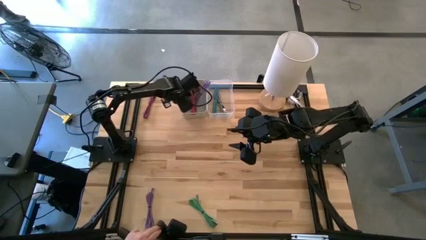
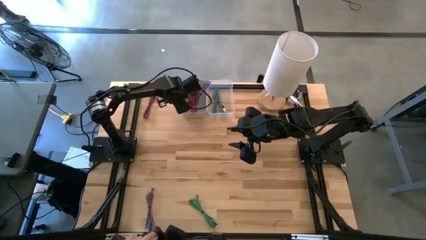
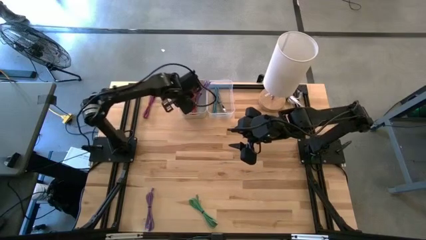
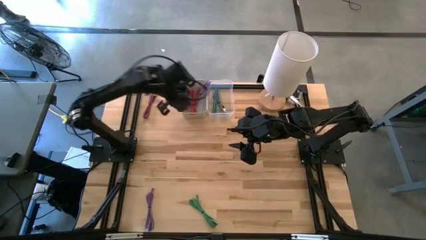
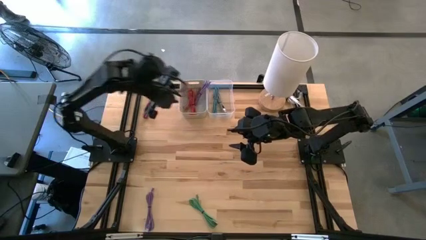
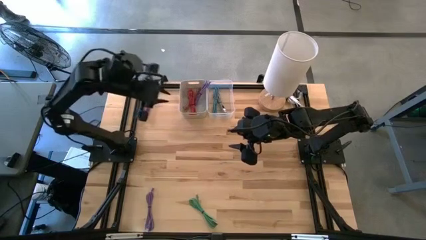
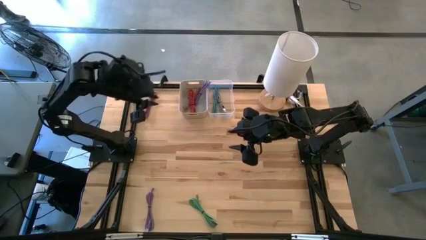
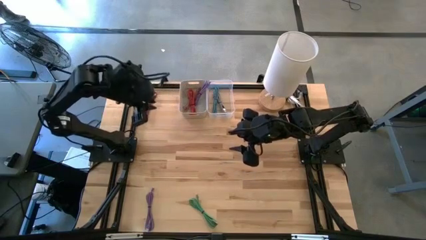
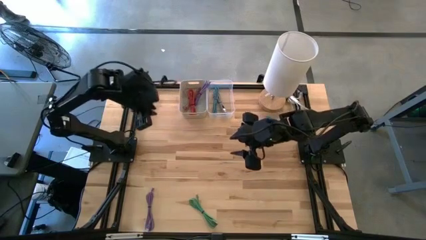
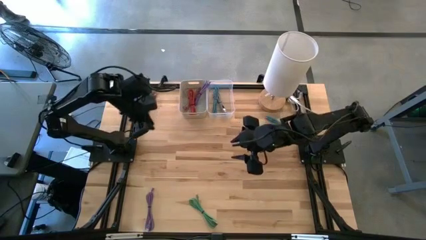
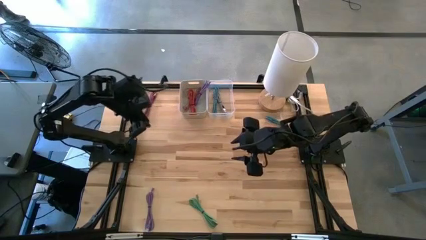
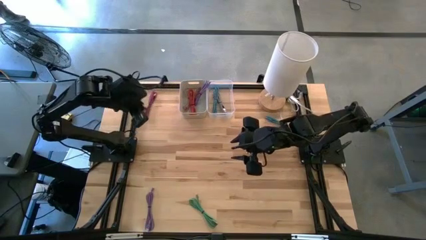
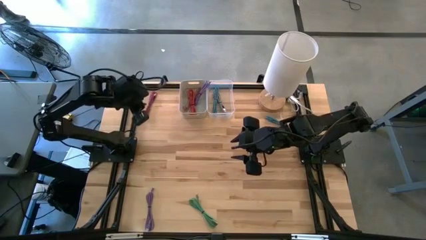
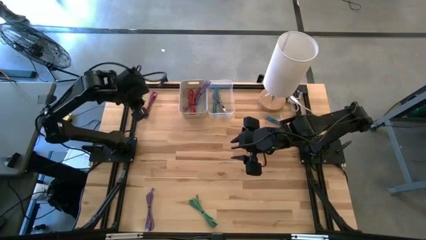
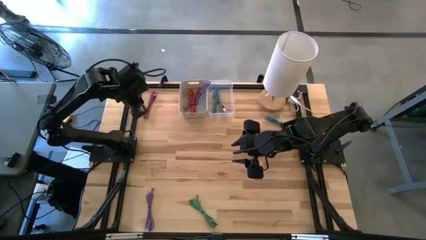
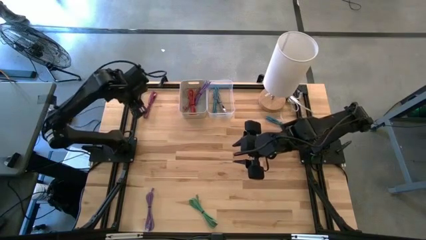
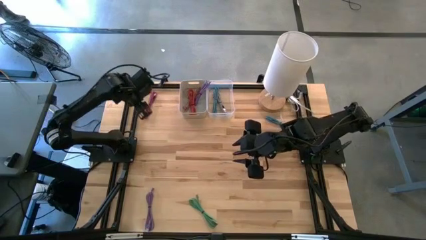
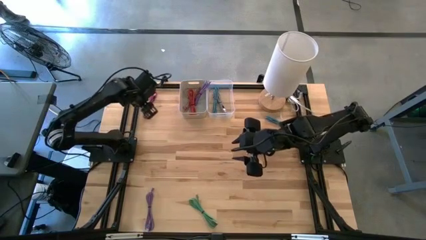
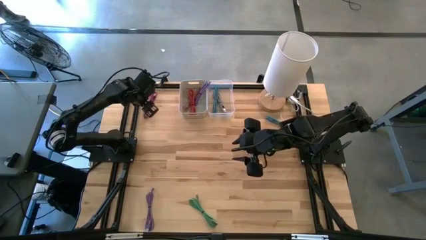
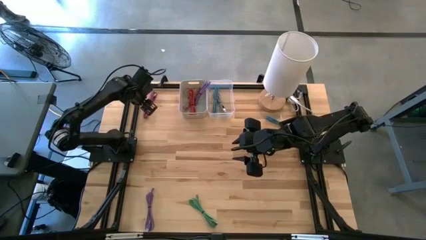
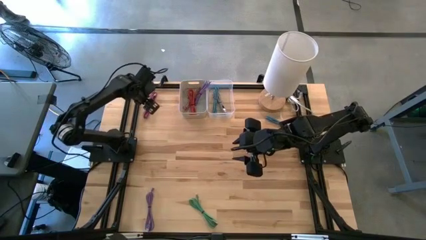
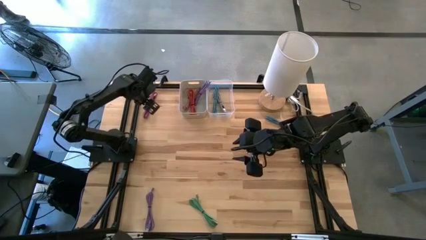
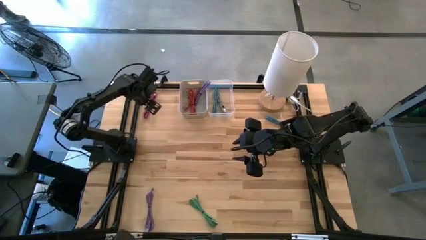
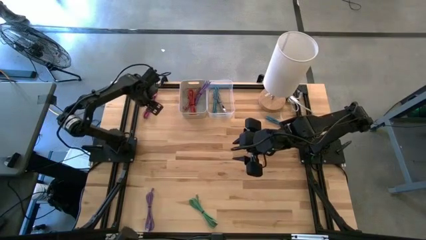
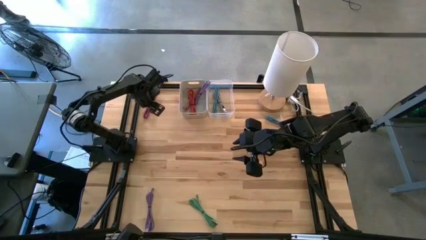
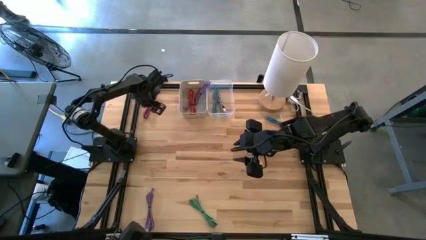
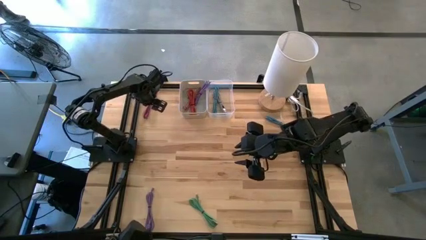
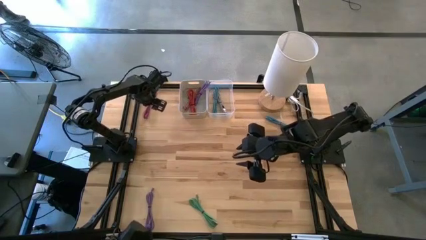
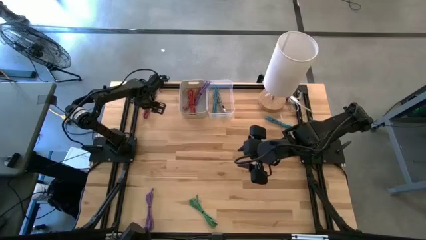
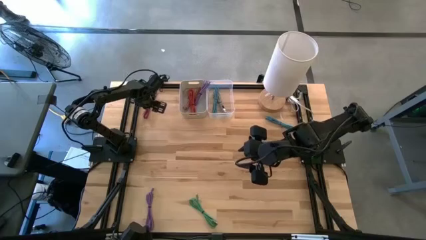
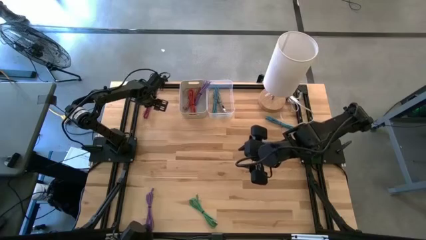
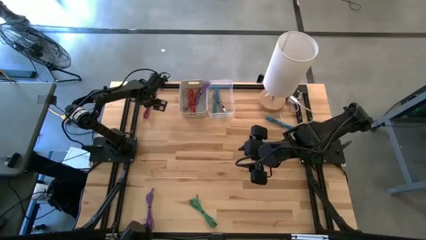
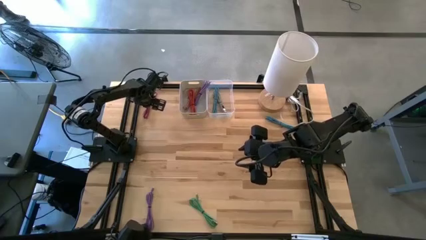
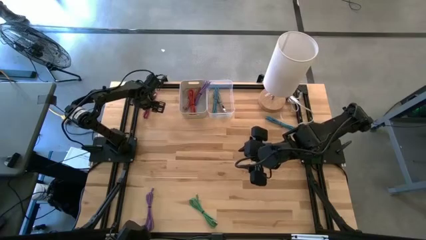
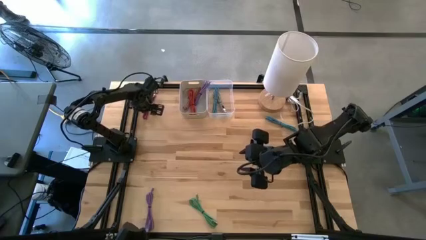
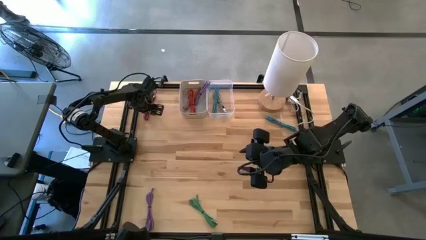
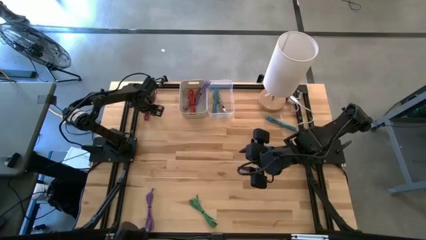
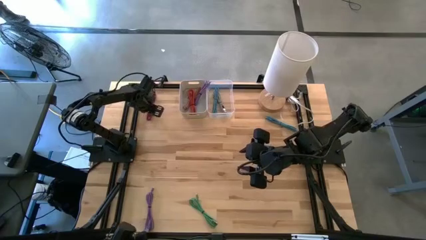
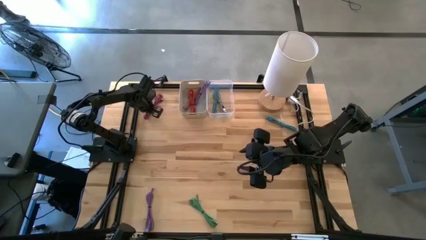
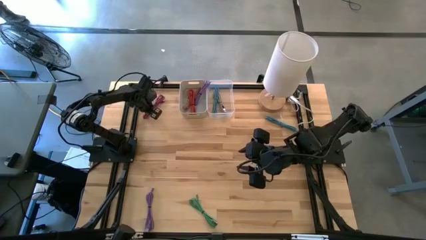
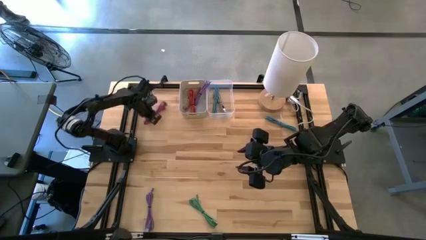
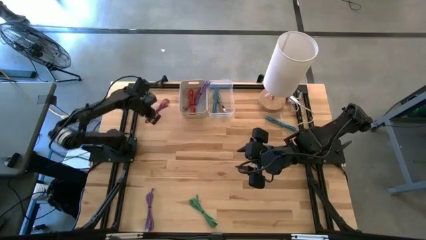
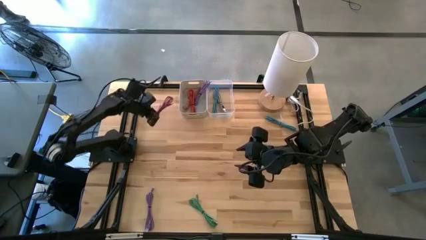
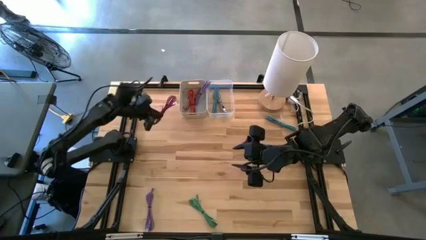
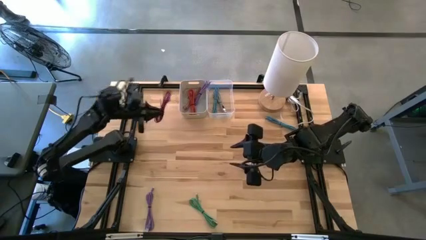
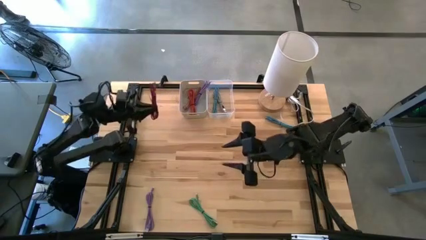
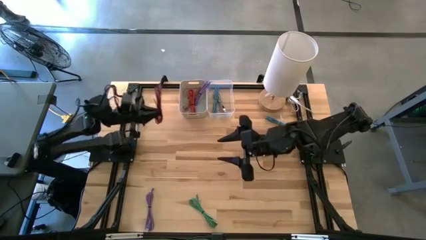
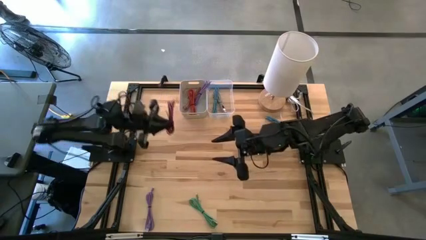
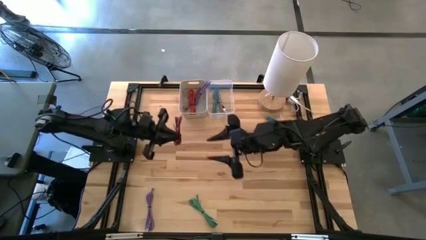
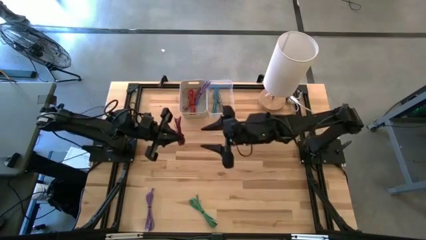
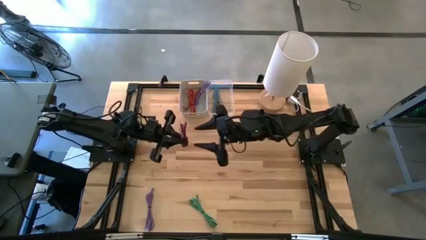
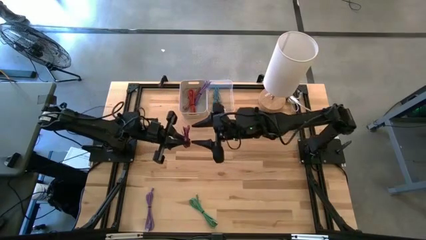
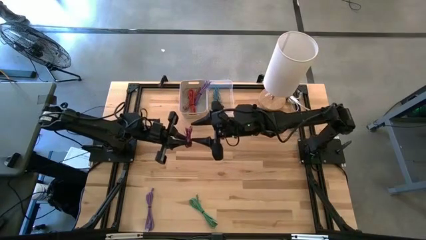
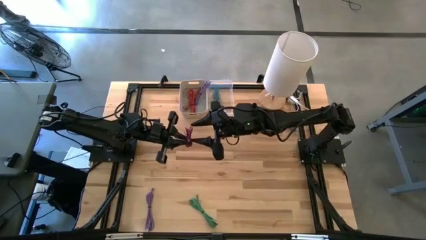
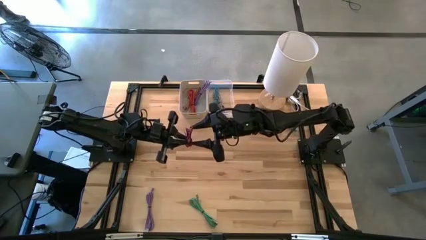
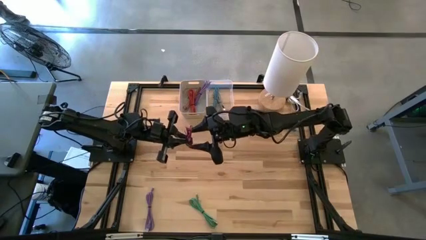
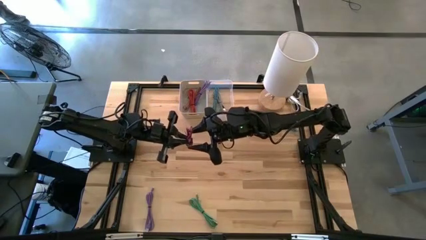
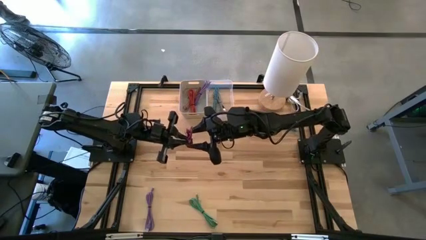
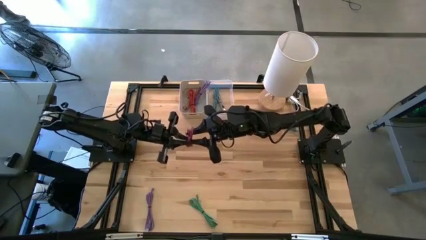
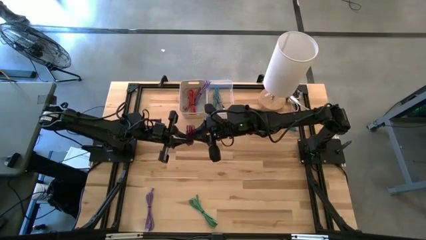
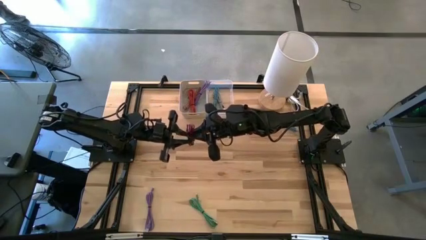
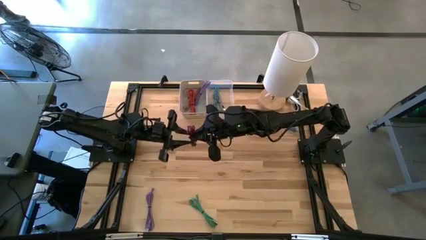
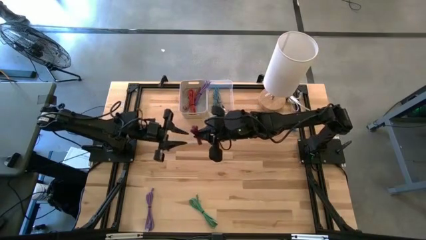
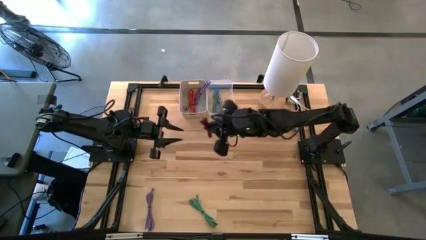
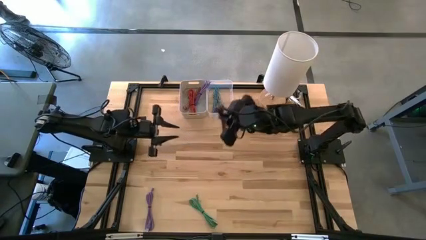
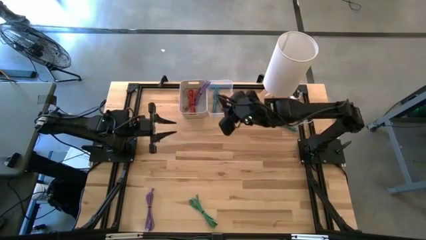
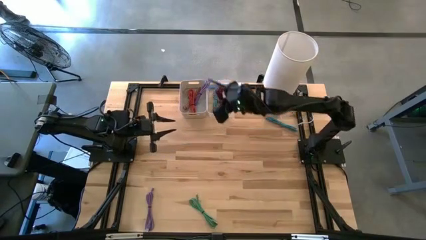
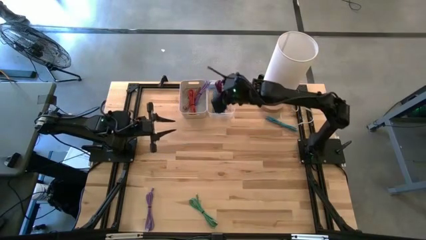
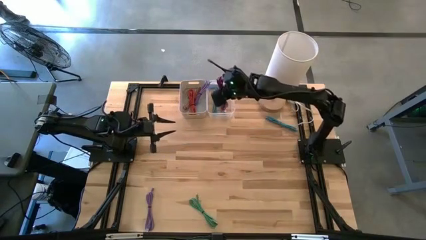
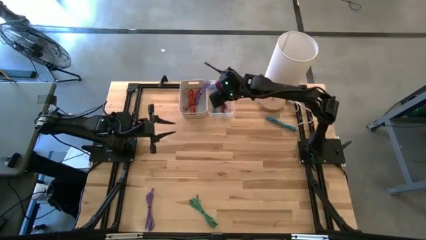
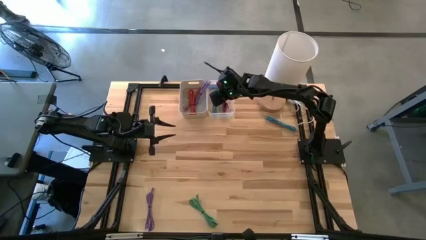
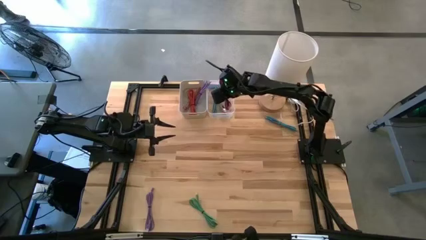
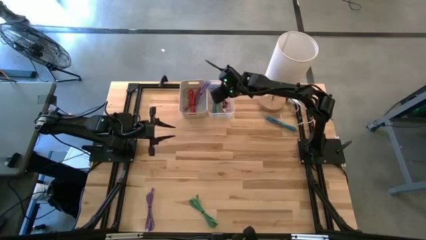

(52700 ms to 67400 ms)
Task: Pick & Place USB Port
Put the pink and black USB cable into the white transparent bin
